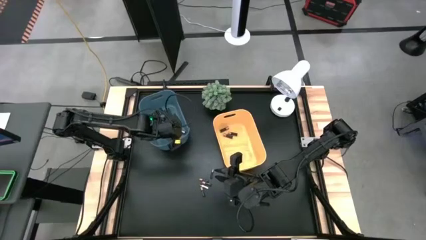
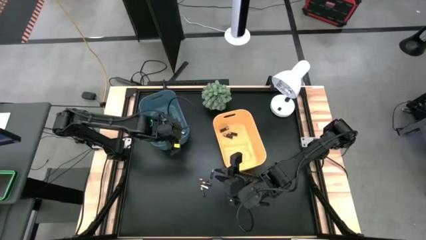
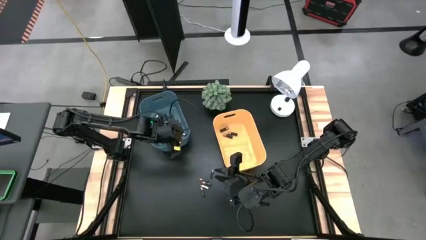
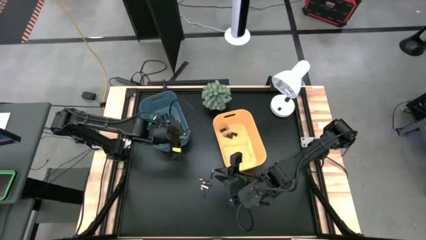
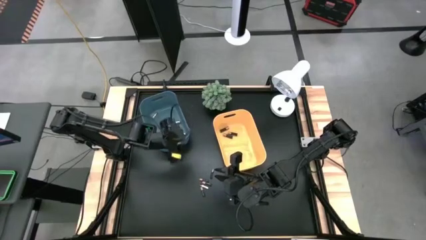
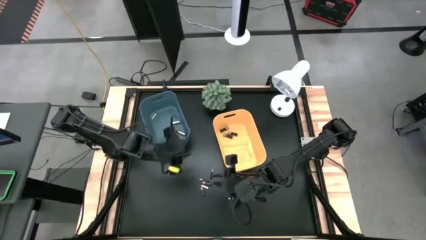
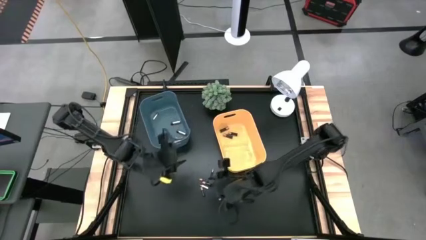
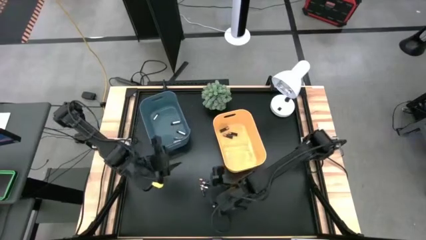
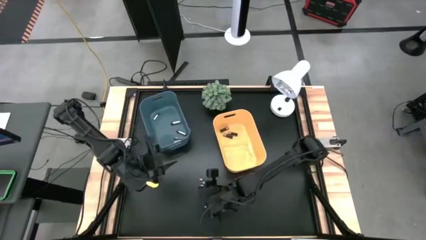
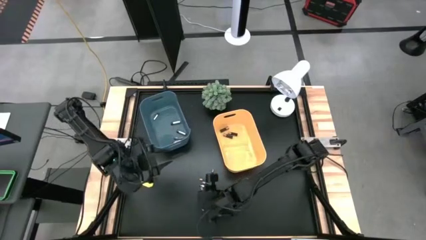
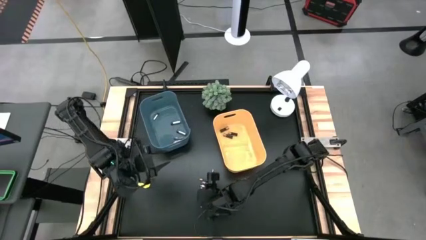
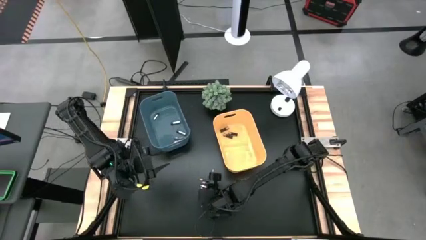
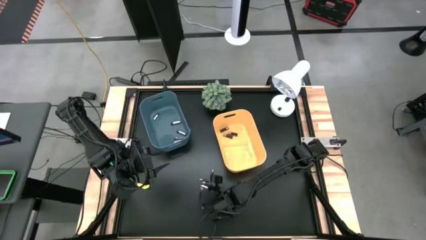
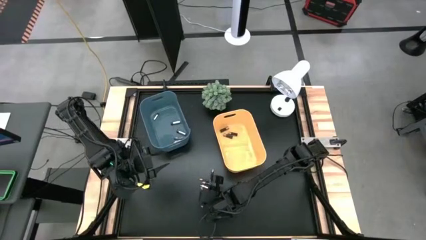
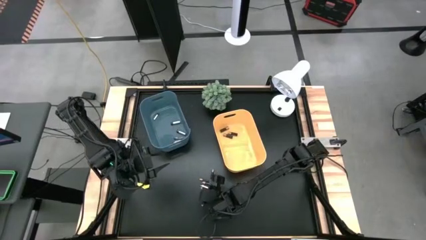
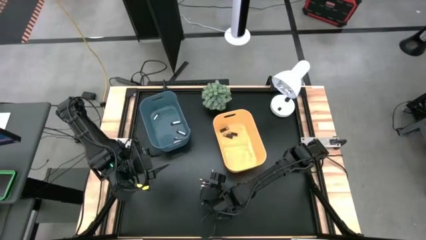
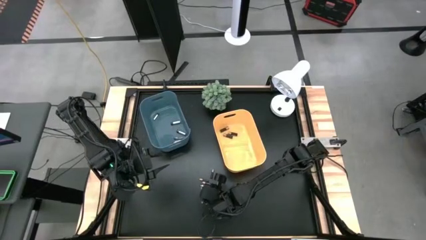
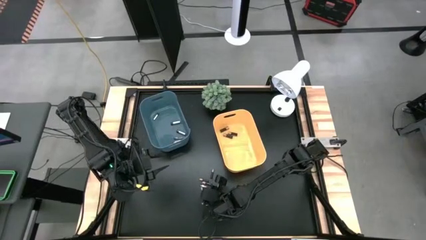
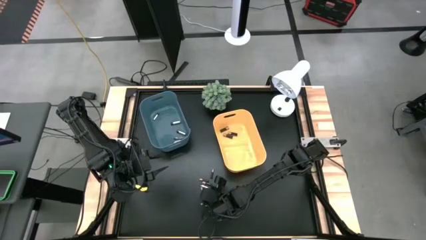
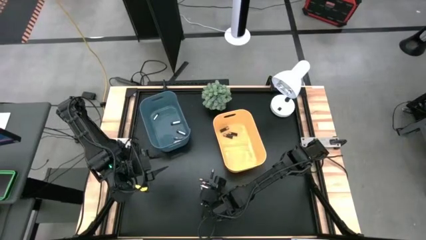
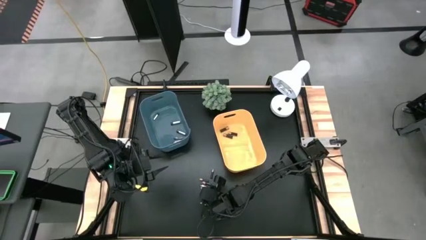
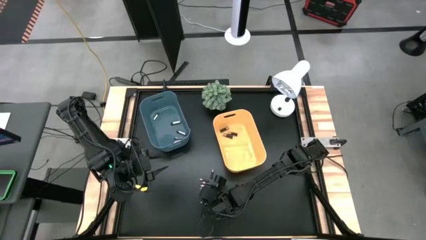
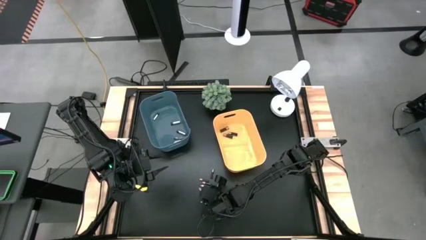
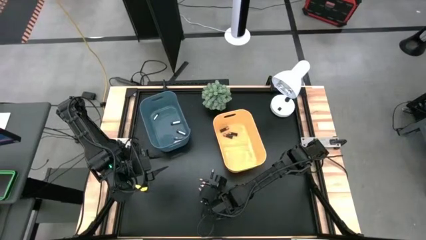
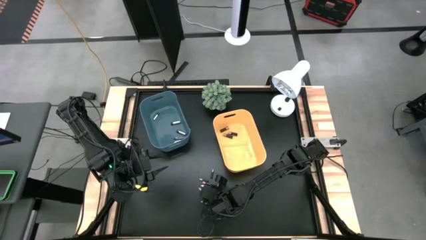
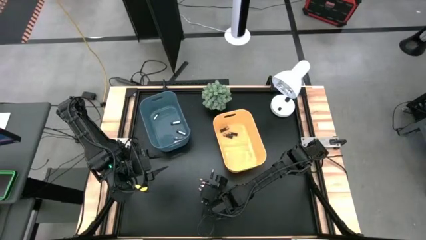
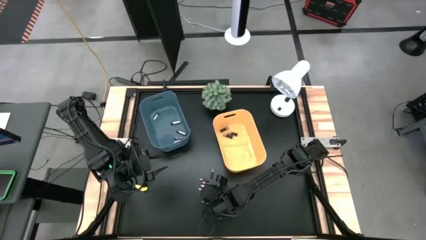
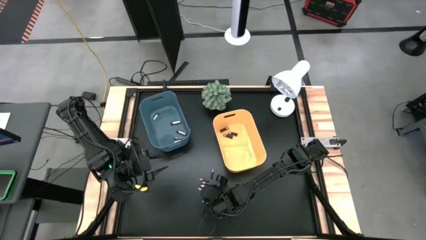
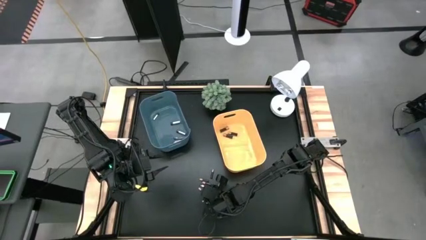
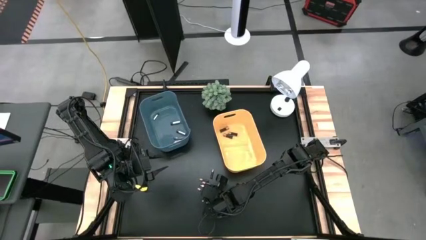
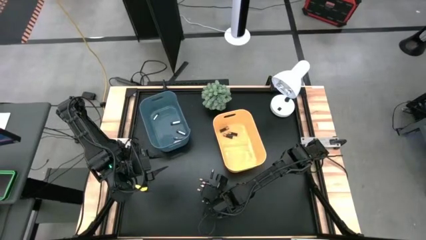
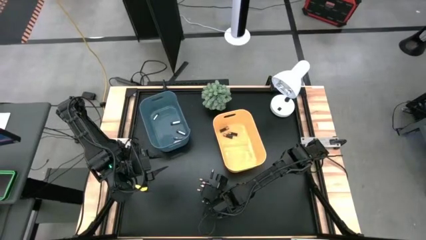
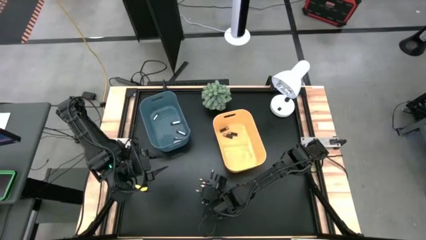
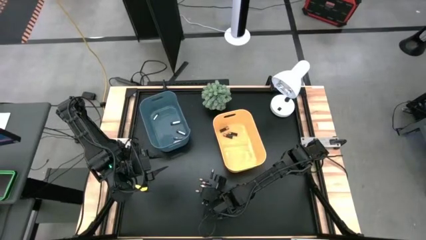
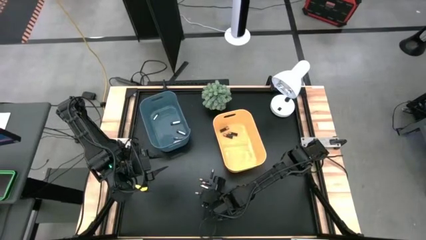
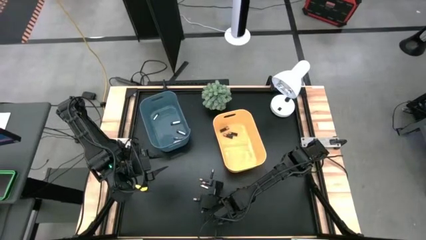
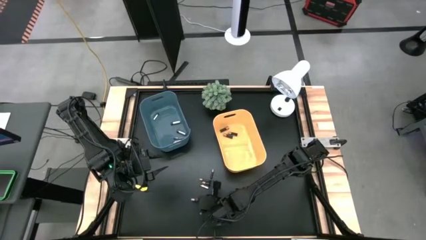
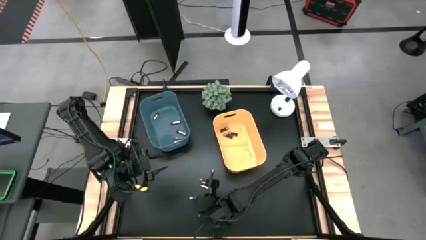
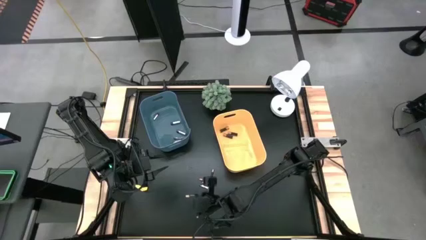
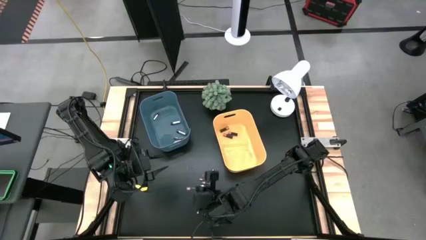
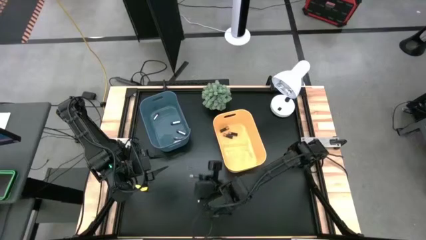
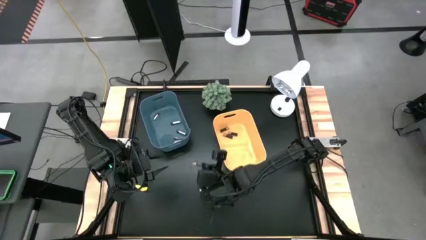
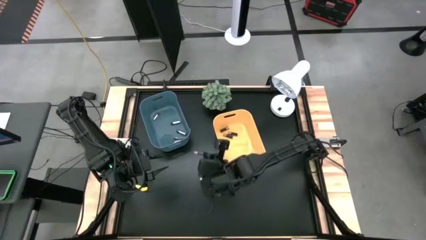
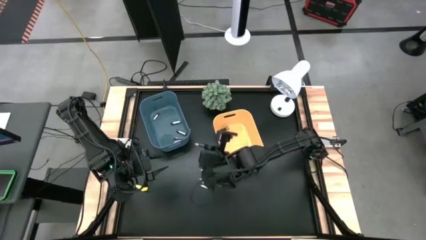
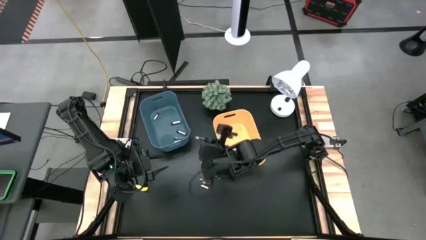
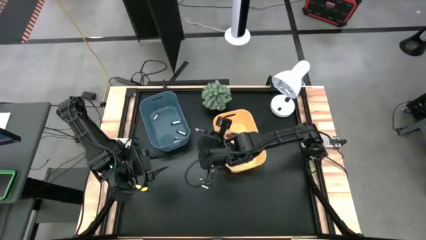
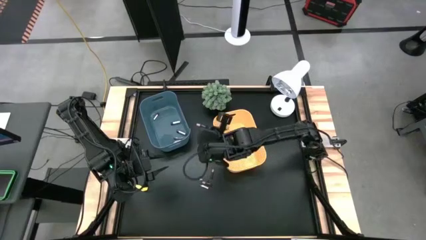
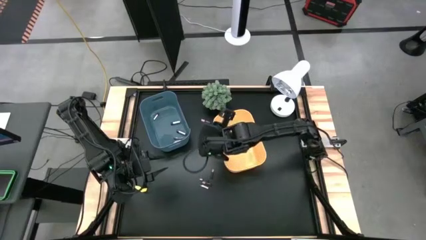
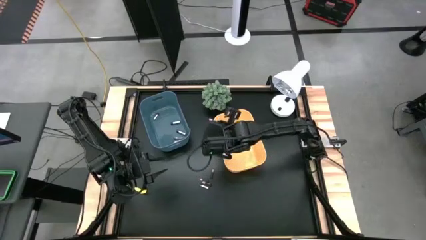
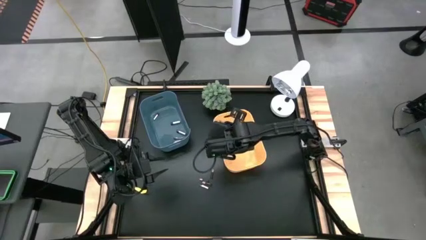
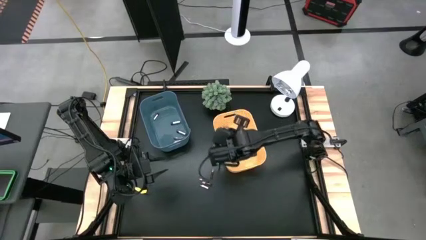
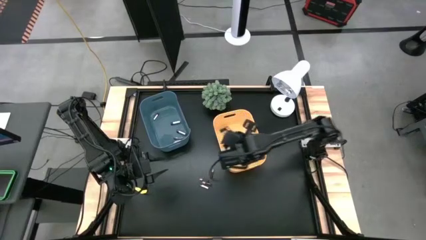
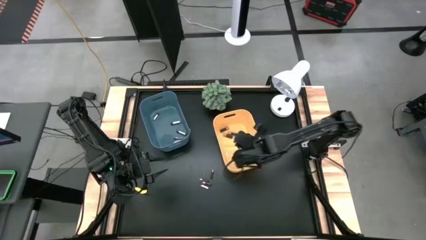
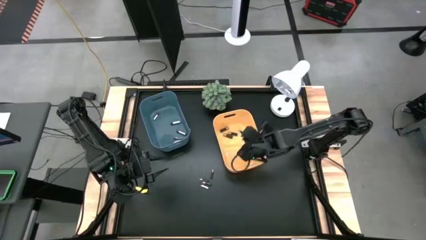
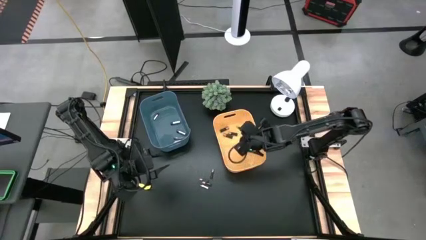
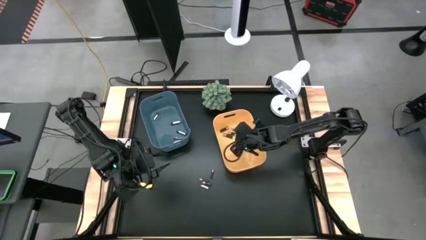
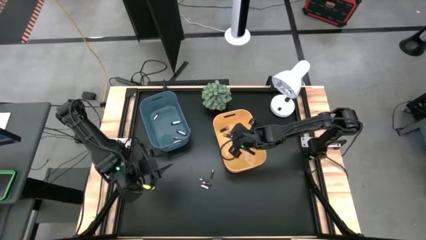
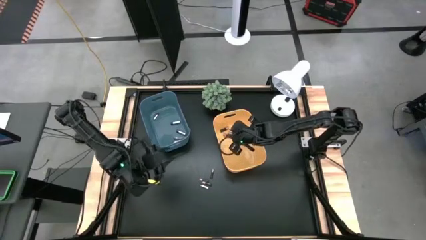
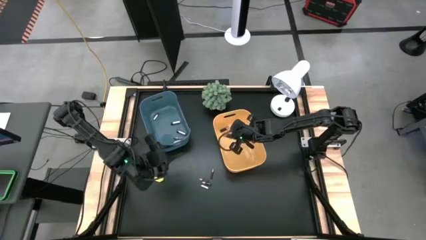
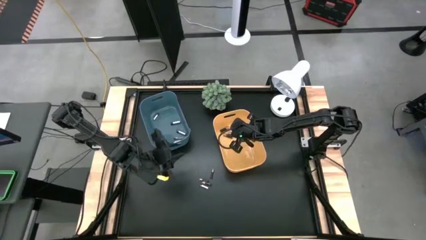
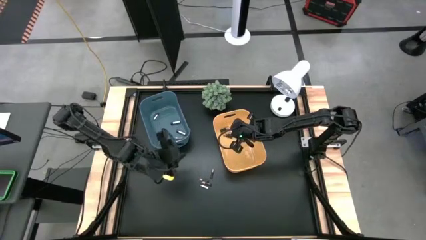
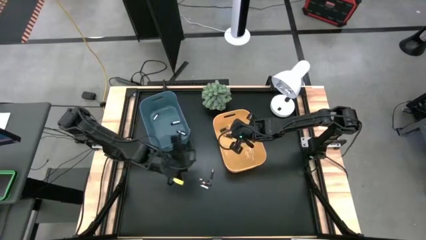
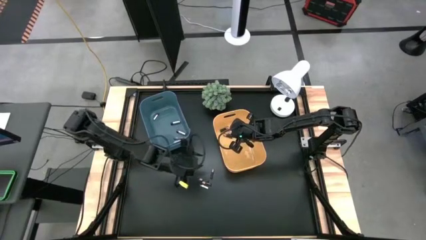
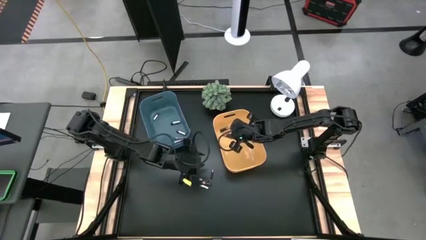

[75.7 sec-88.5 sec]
Task: Sort batteries
Put the black battery into the yellow bin

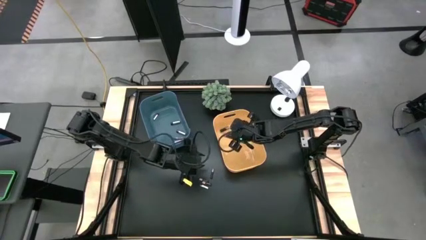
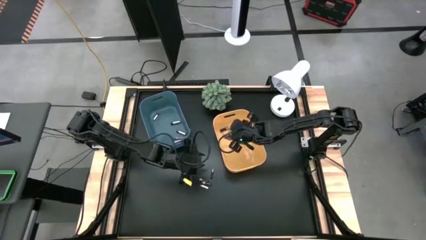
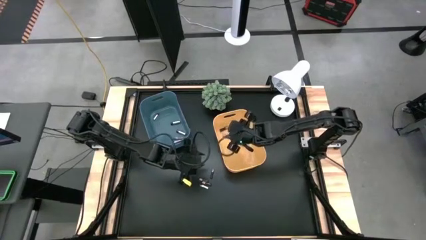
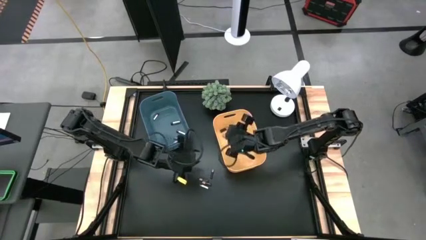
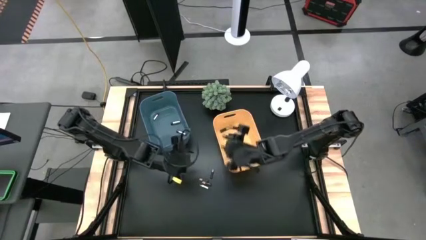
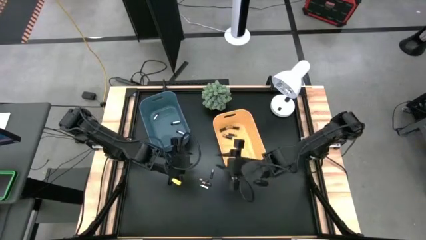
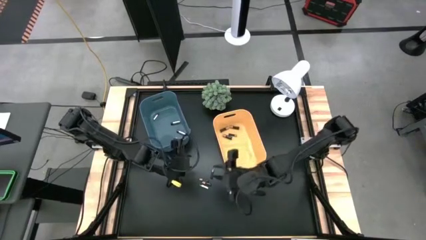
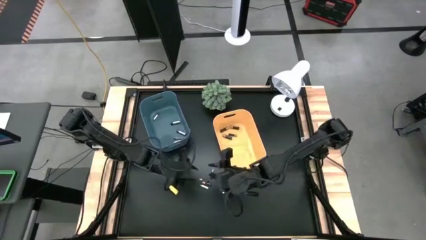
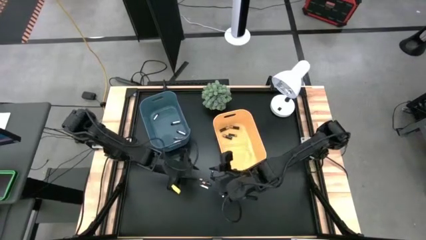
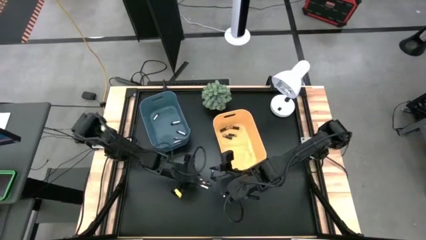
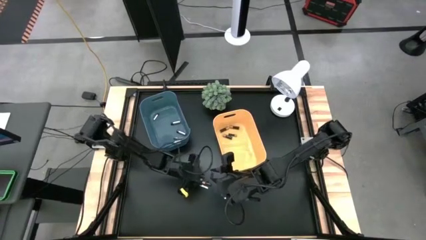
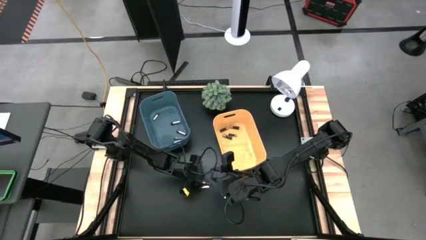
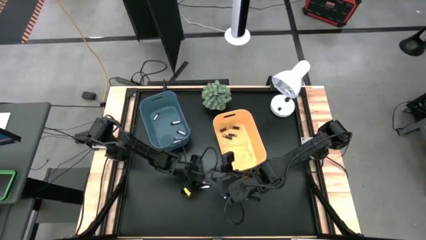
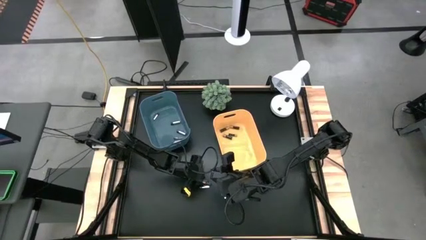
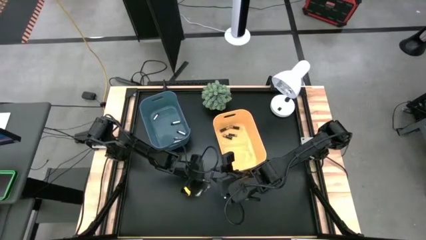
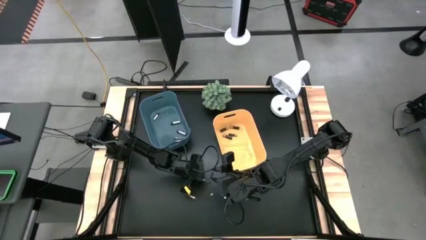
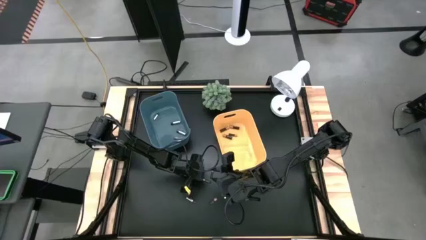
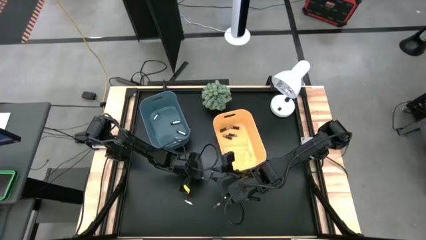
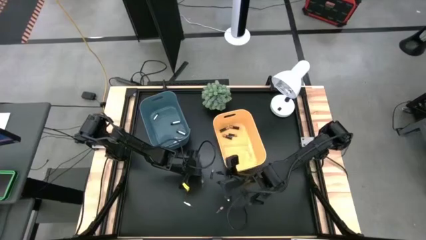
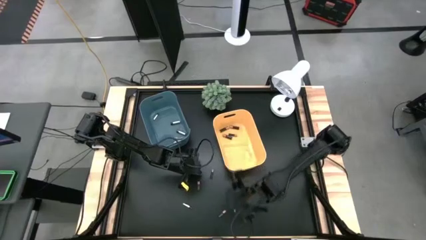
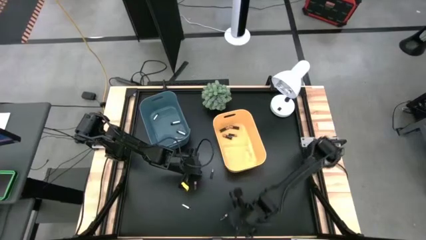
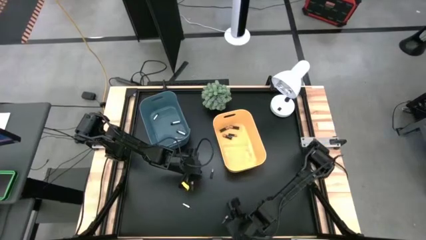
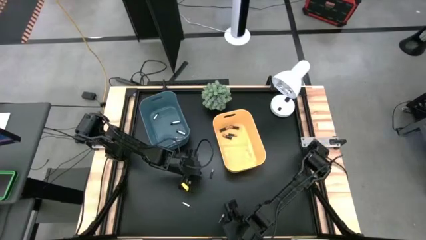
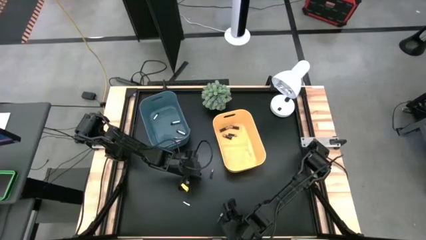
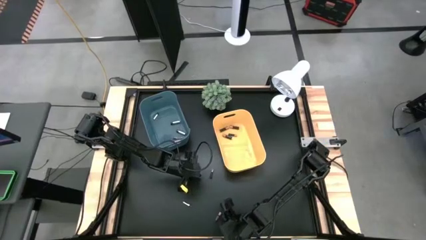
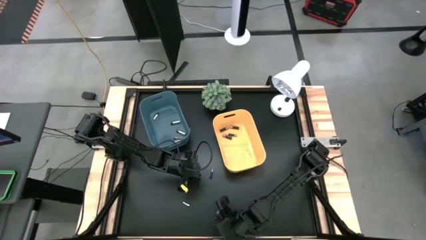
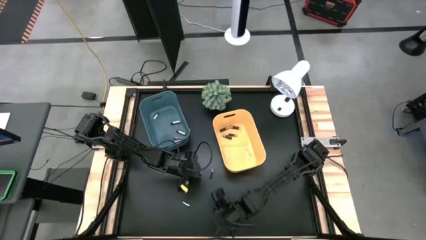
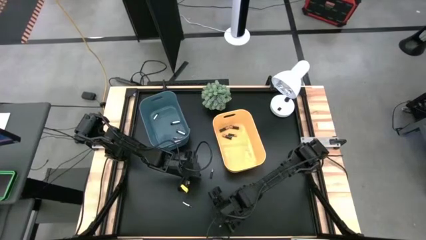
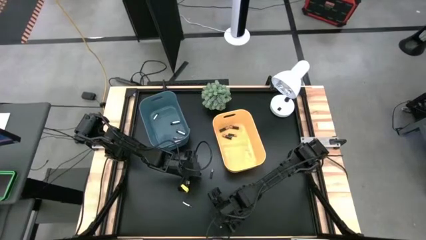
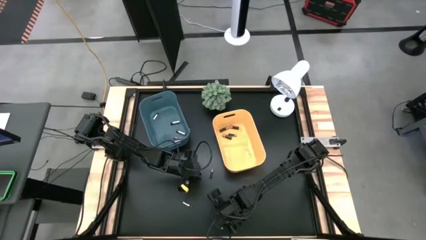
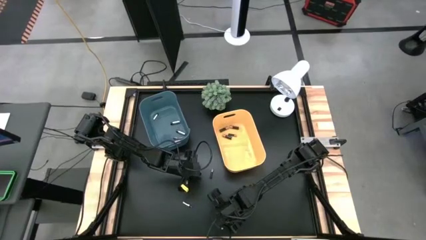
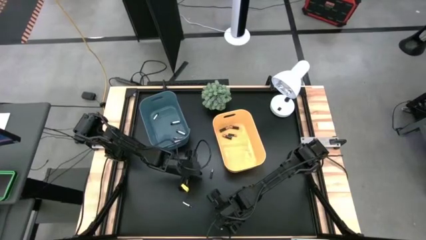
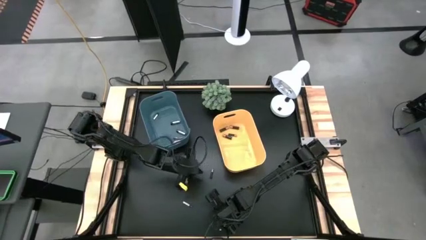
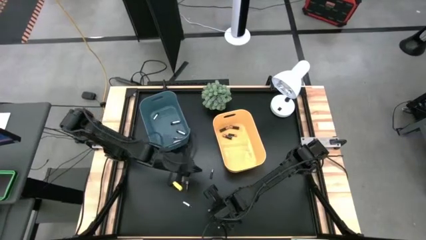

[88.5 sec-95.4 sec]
Put the black battery into the yellow bin
